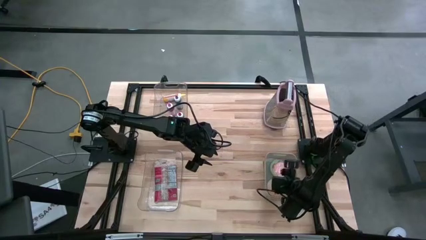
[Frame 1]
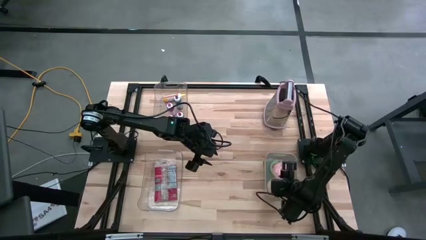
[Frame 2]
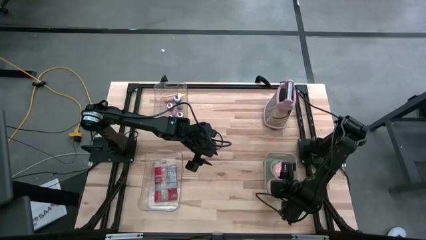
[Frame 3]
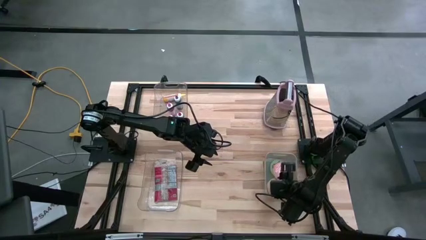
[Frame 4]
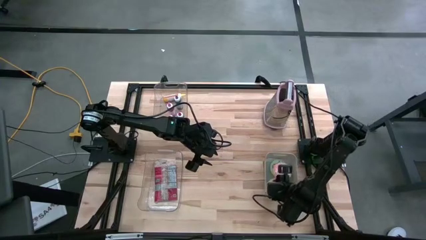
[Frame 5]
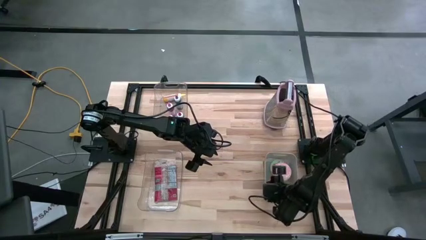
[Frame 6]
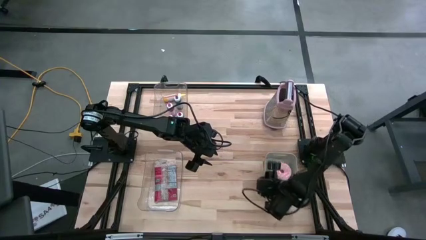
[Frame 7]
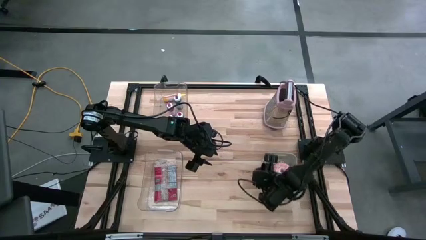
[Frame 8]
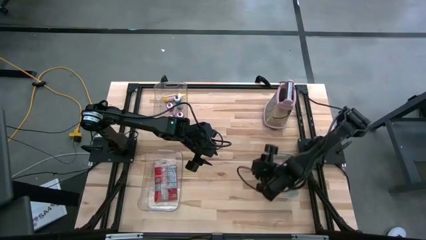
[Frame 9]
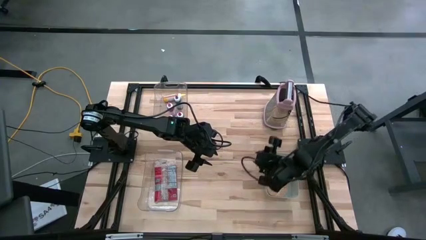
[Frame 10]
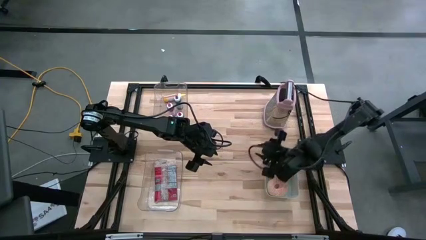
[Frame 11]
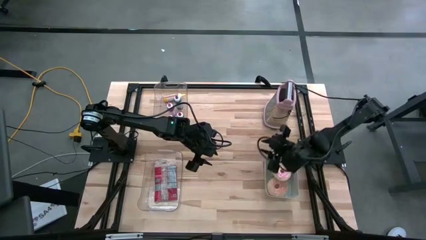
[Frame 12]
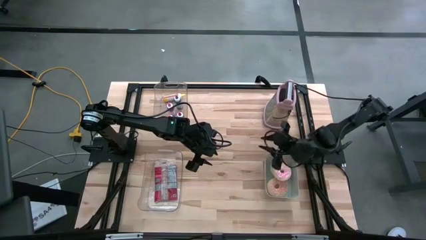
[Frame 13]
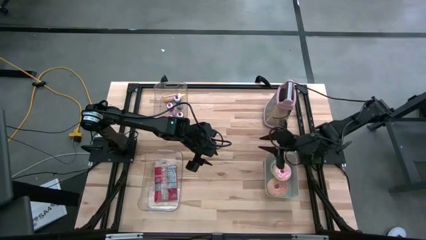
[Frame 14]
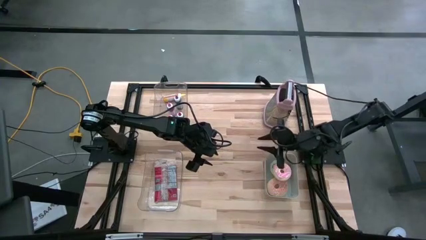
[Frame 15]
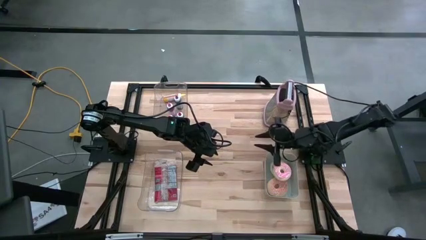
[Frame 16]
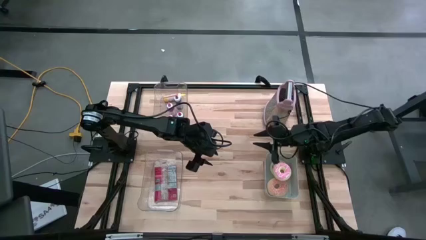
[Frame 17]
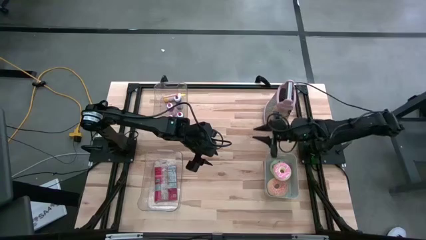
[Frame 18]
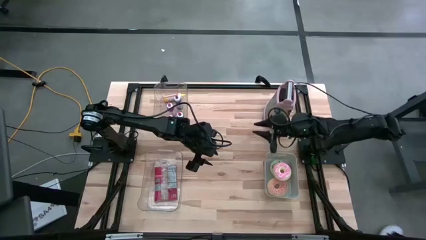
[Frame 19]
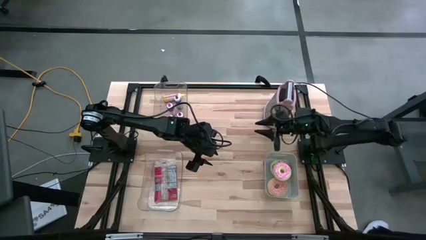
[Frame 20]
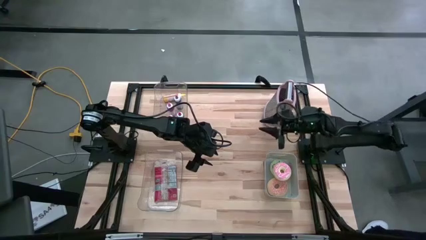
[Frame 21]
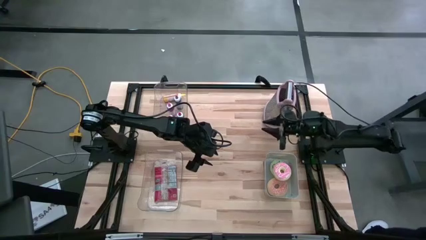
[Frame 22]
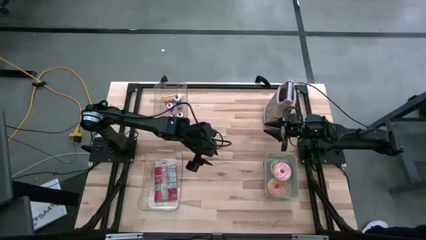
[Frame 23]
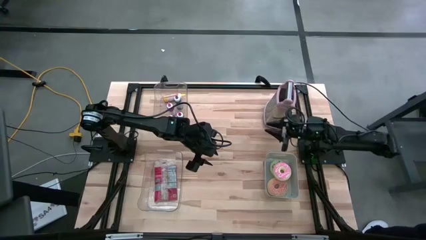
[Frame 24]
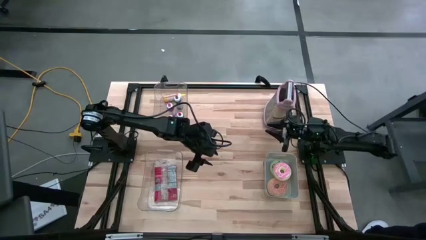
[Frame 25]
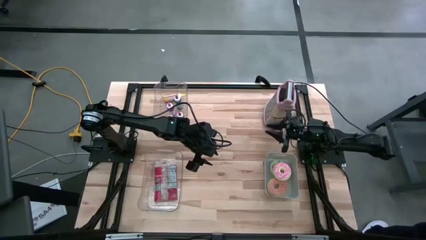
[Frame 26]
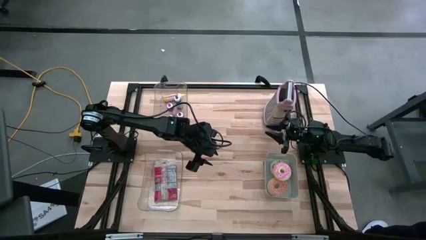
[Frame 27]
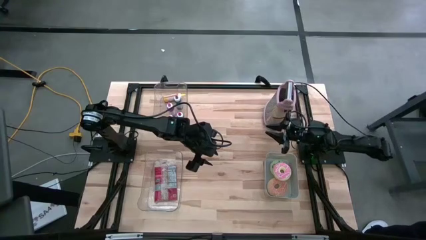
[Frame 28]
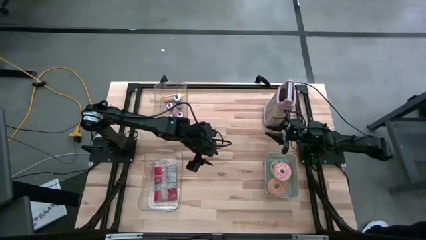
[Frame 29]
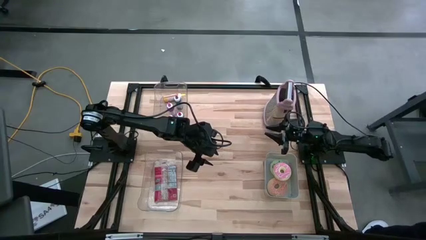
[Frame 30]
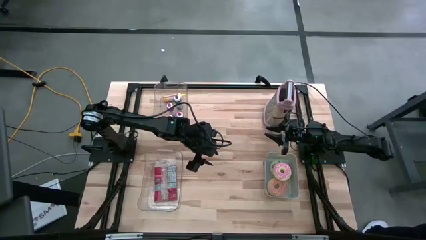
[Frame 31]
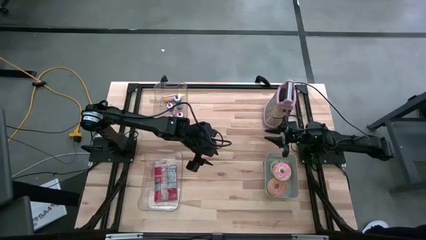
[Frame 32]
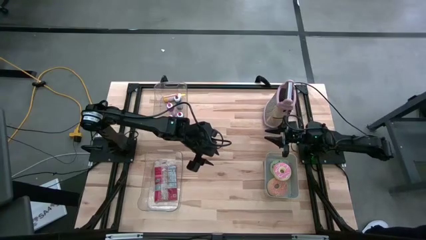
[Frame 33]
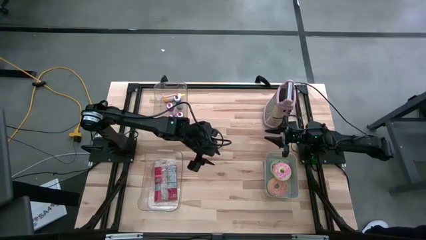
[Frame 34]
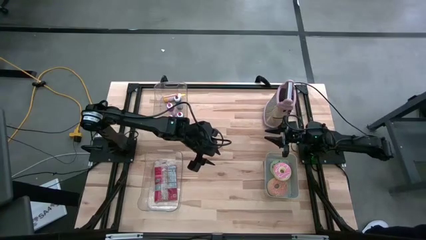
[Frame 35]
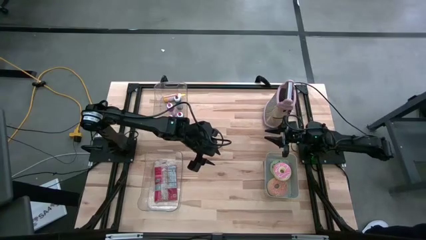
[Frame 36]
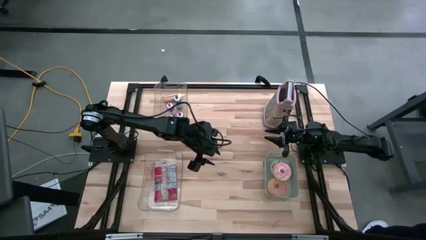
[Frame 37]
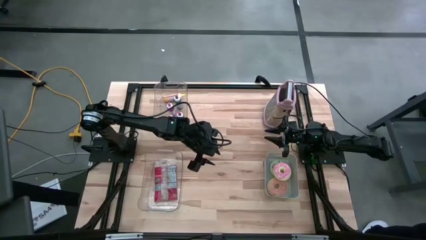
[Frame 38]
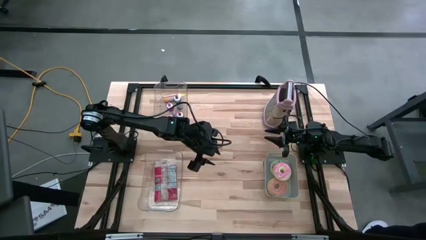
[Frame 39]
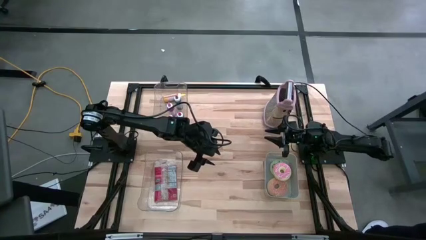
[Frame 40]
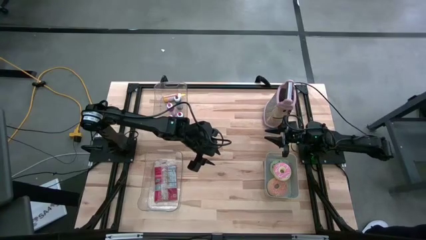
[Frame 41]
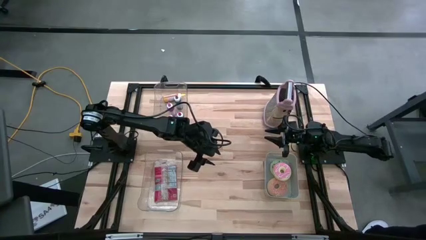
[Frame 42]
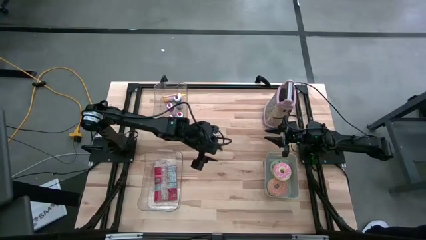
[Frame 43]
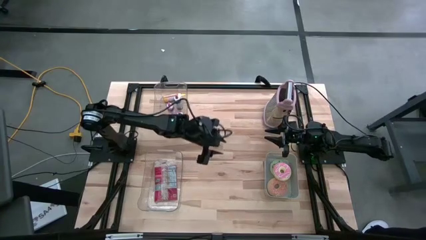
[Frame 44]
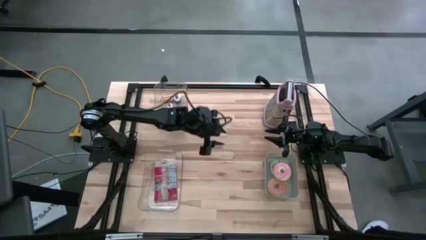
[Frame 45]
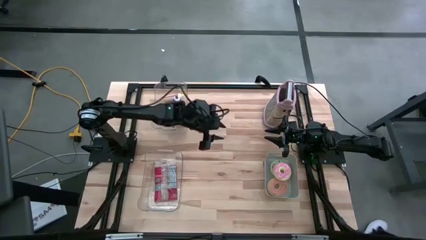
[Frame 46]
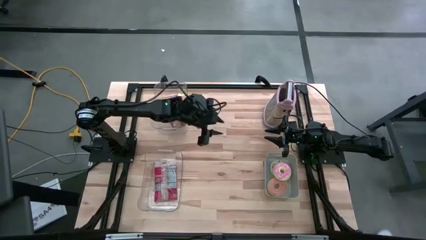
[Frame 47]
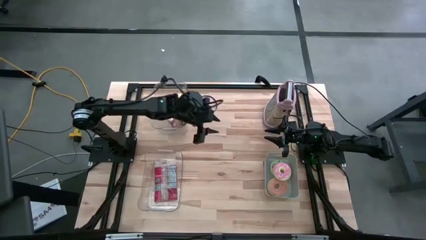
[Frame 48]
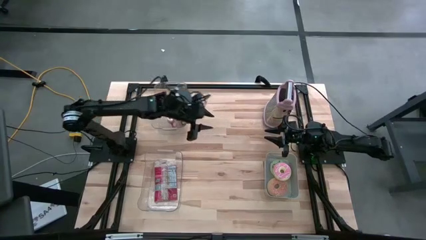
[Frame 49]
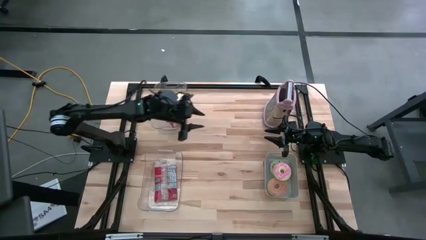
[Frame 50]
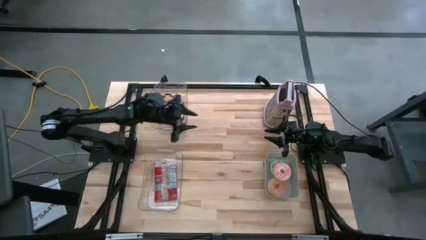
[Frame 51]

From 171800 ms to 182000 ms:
Return to Home Position
